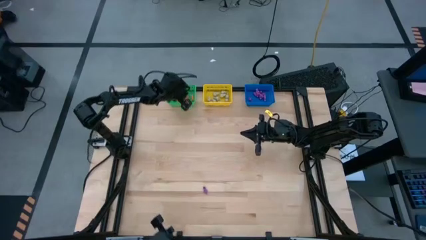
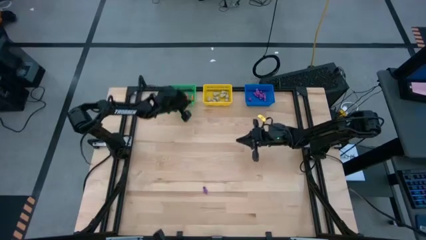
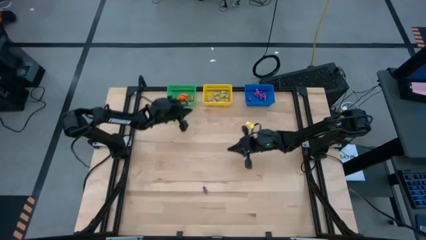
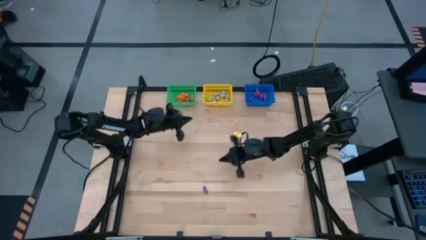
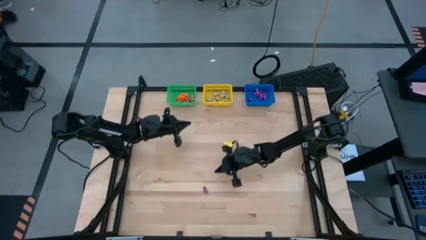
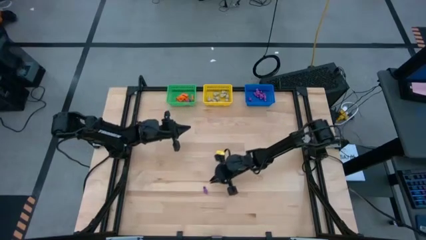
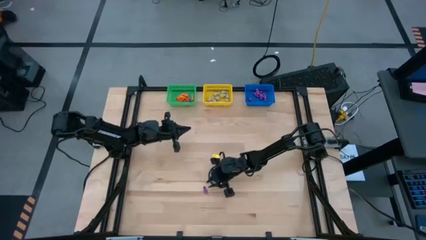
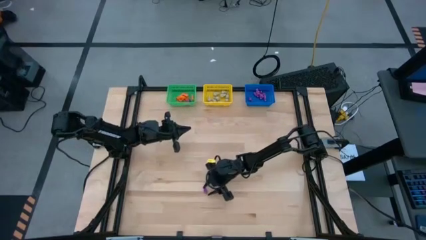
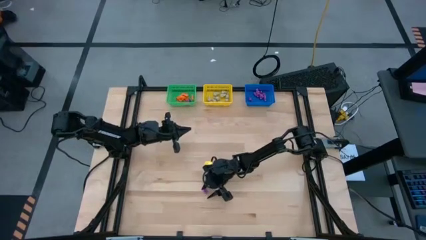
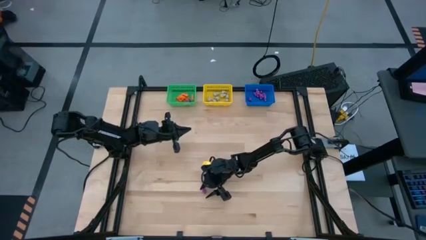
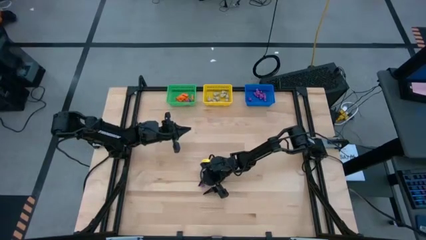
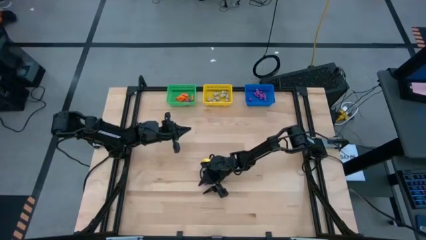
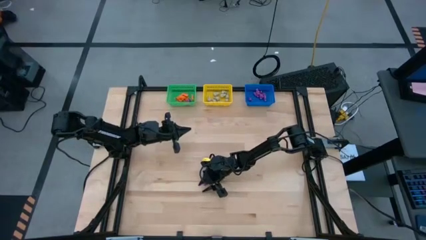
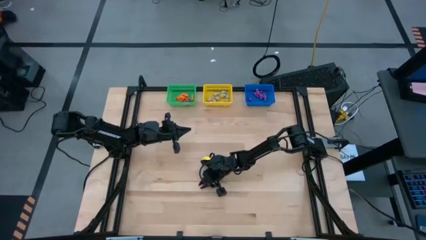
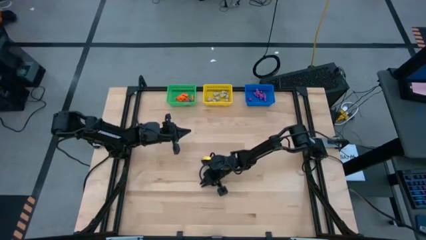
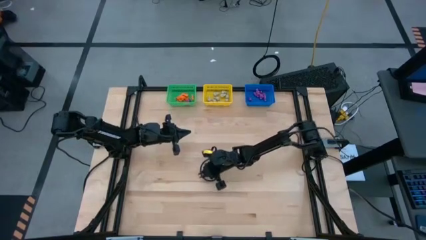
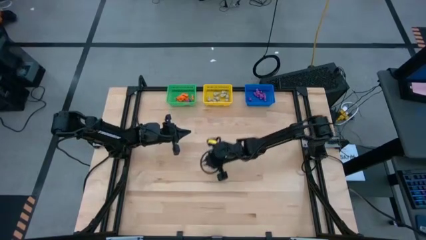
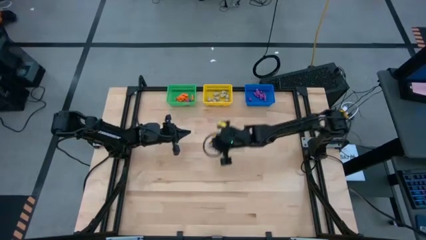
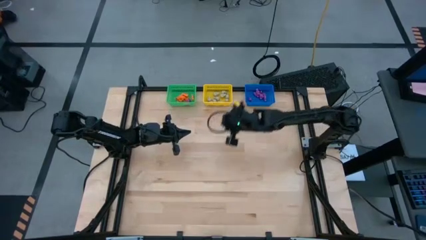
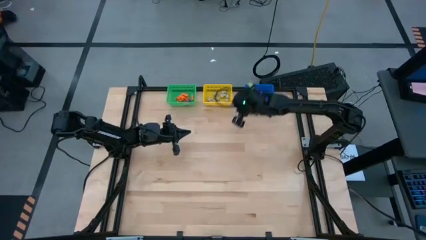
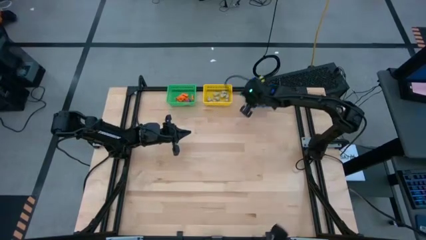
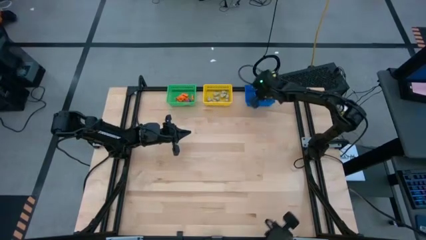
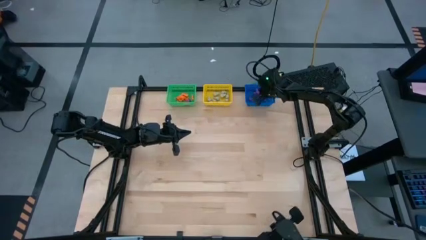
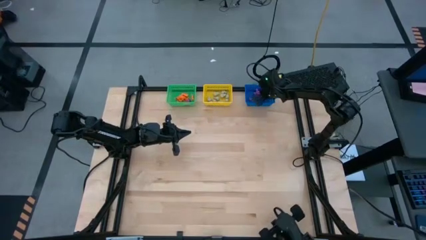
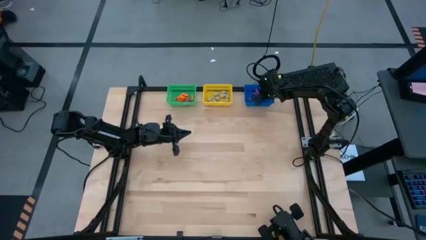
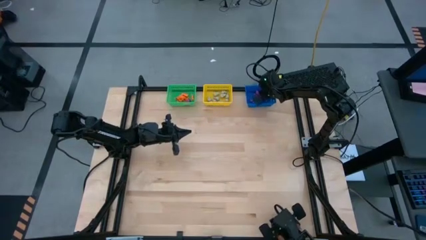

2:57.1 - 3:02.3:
Task: Sort Halloween decoration
Put the violet skeleton toy into the blue bin

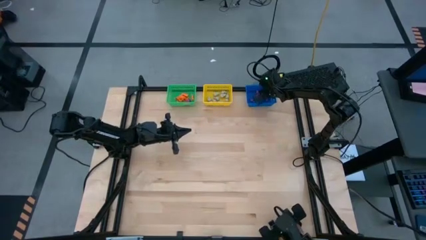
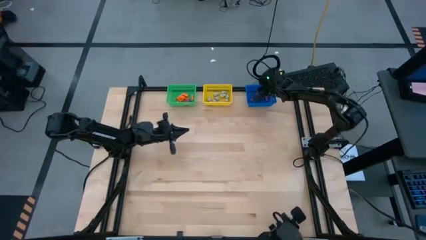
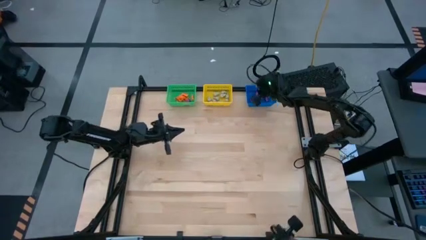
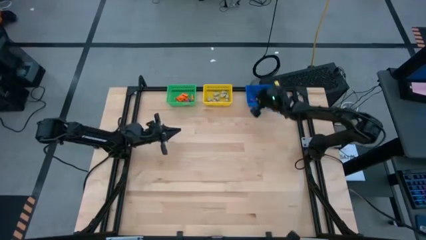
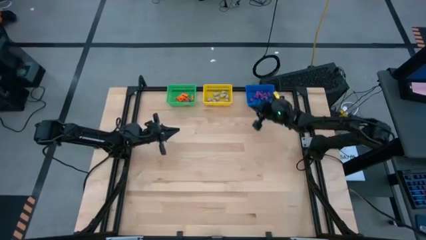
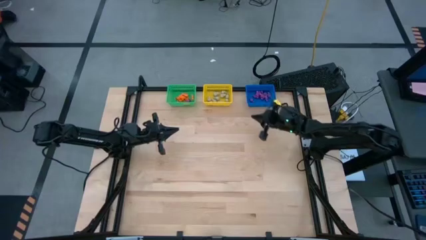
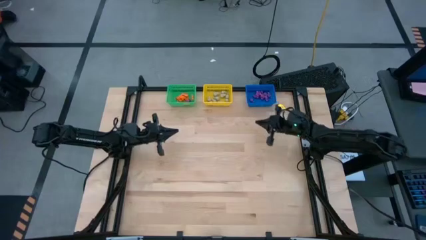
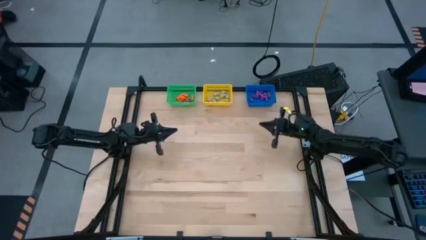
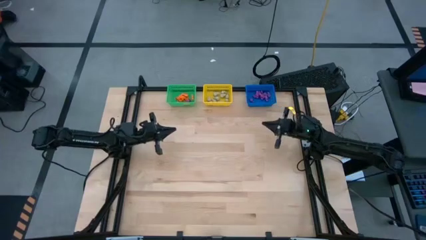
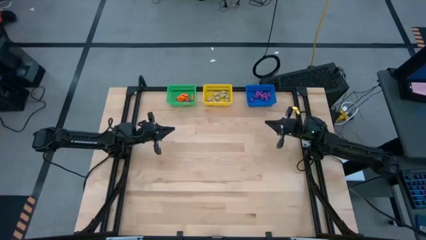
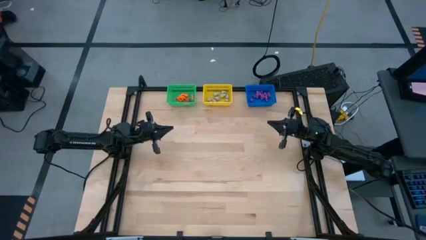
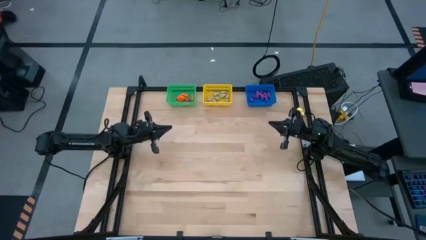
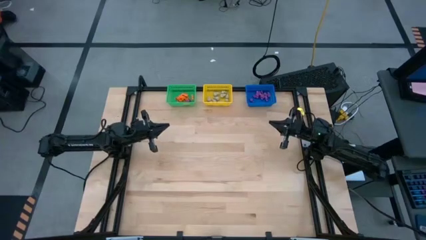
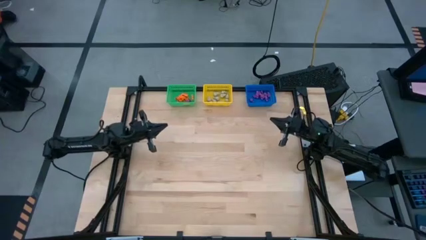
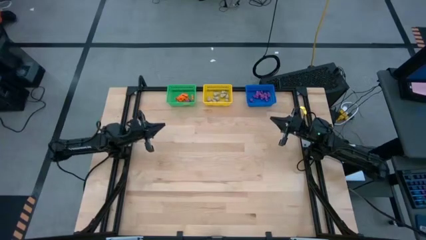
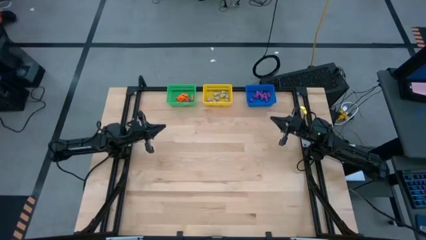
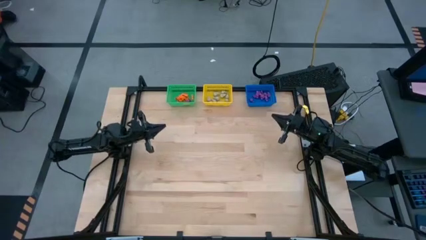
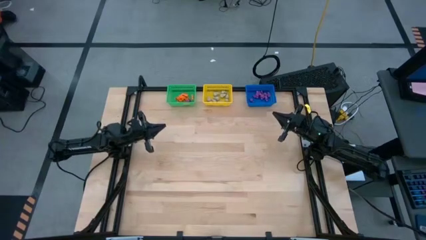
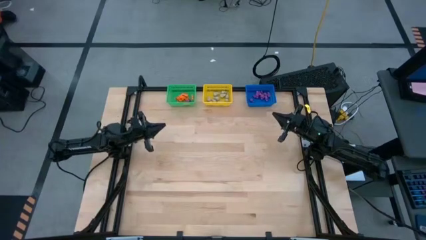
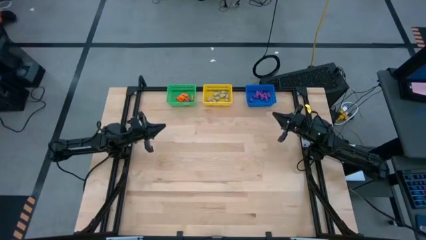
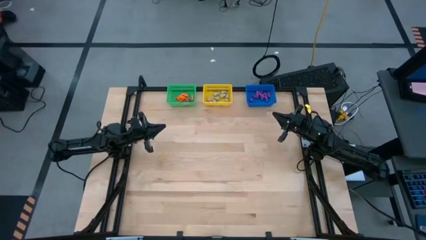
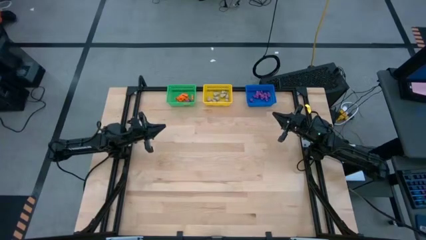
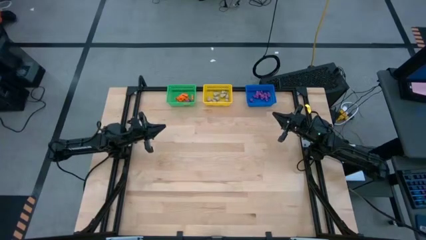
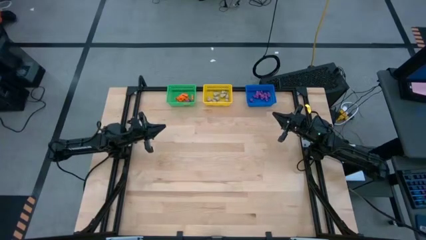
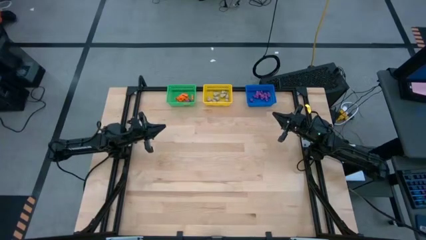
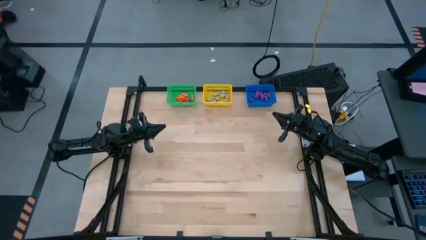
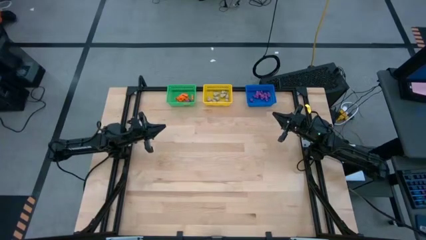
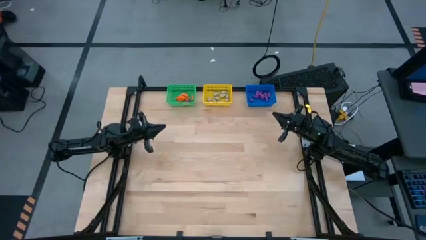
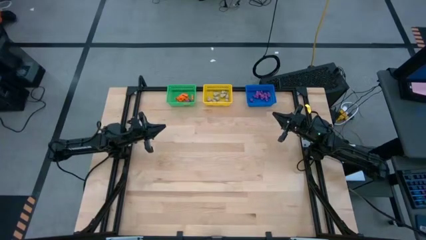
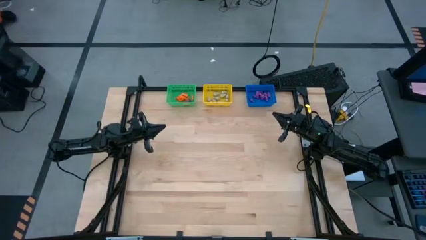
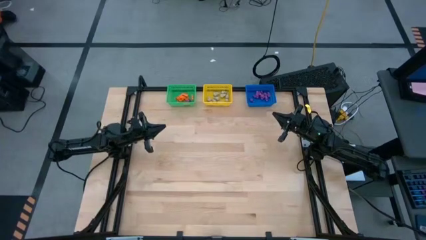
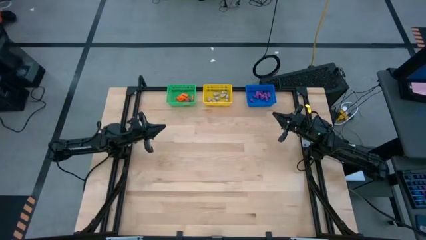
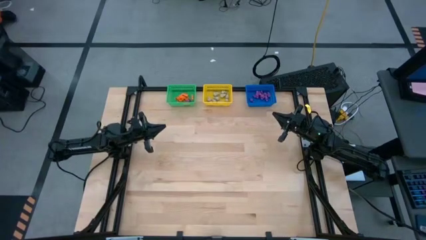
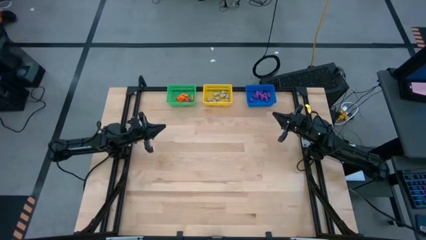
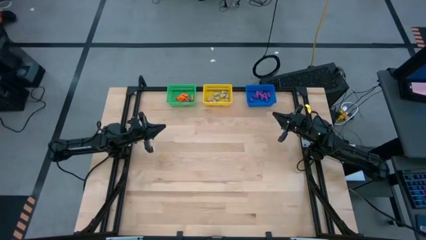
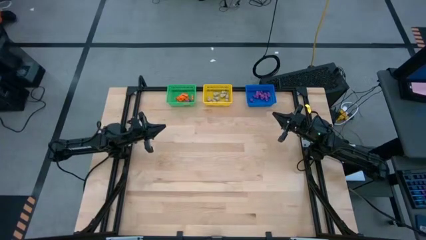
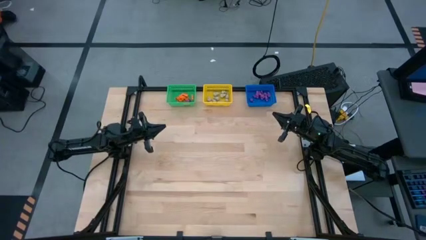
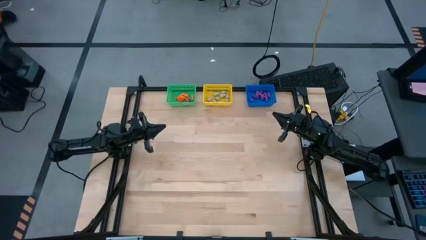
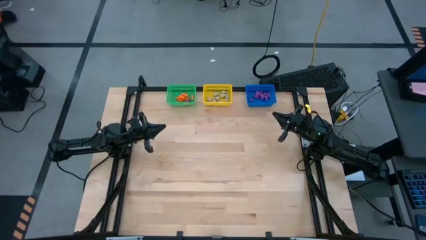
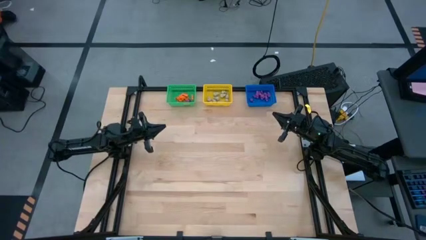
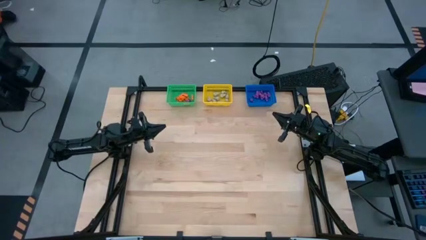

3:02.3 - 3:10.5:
Return to Home Position

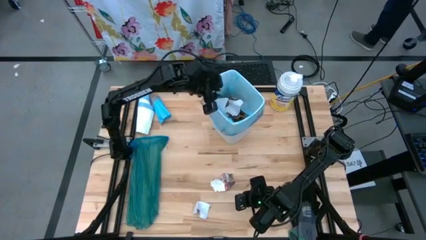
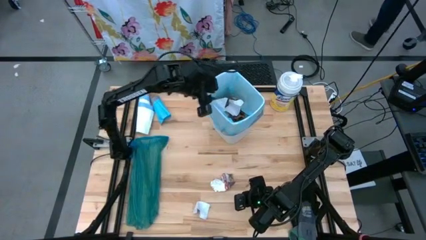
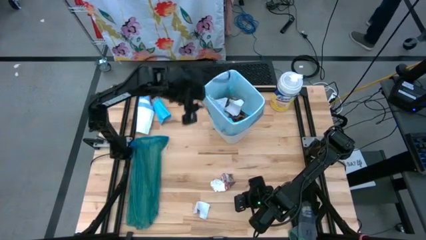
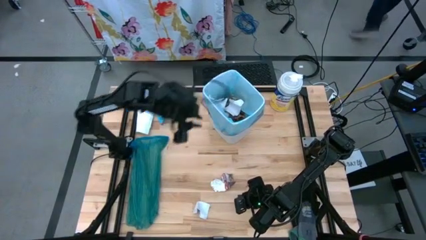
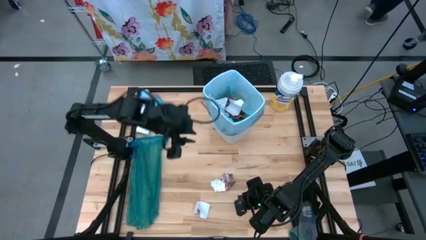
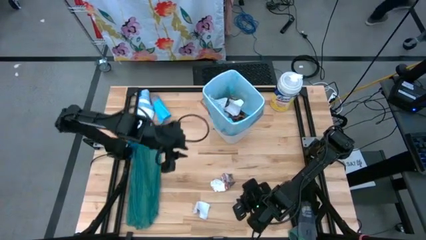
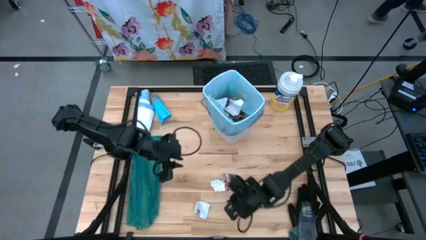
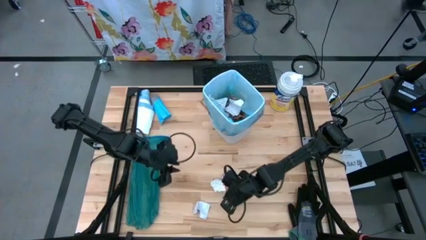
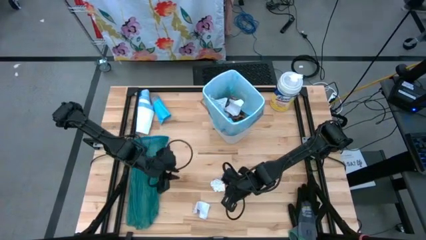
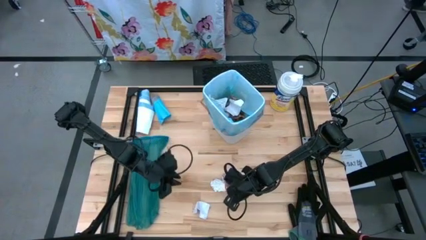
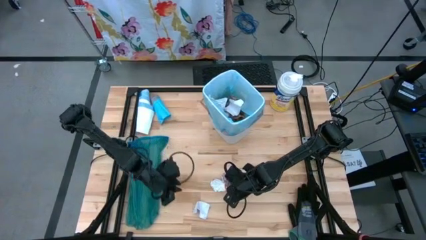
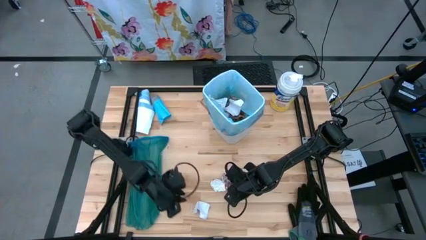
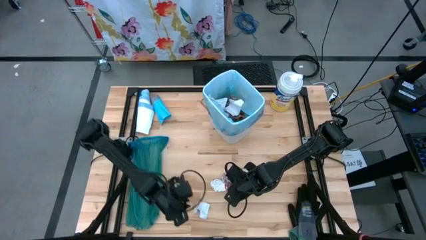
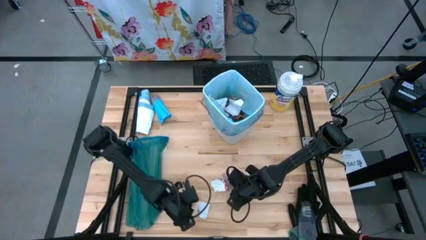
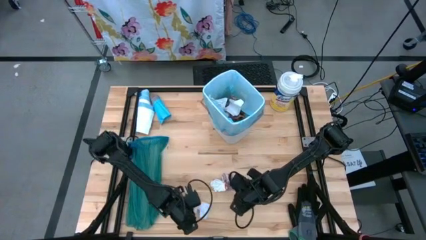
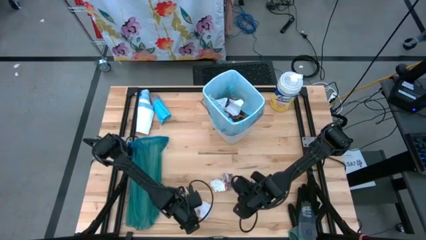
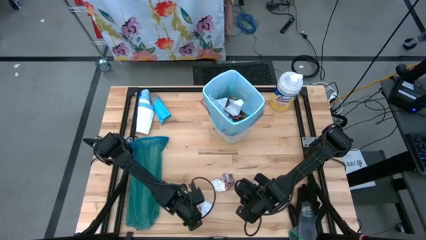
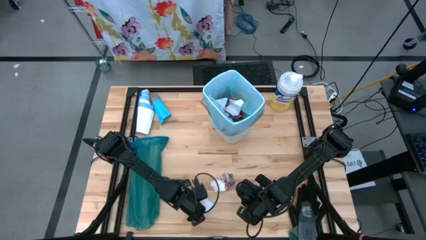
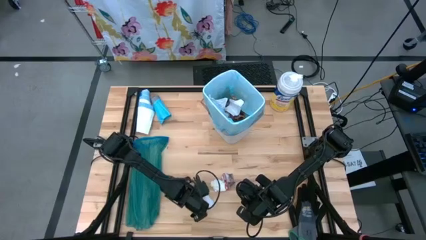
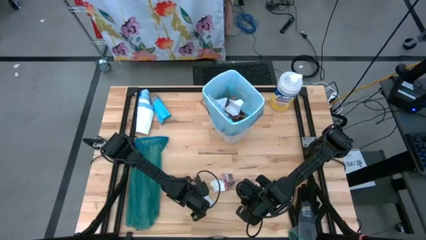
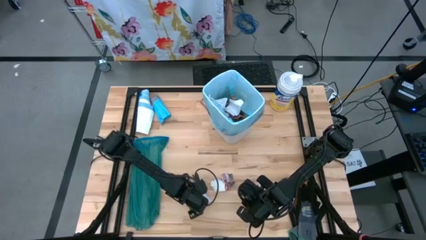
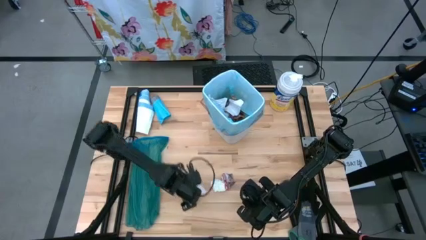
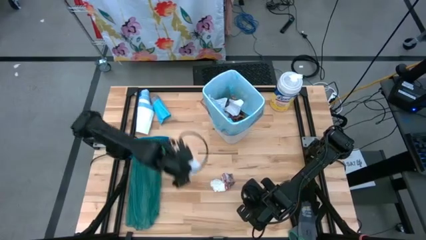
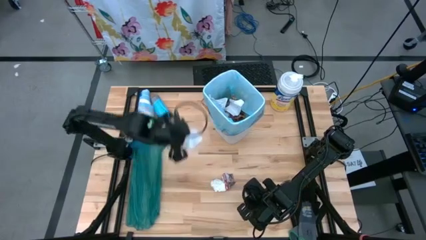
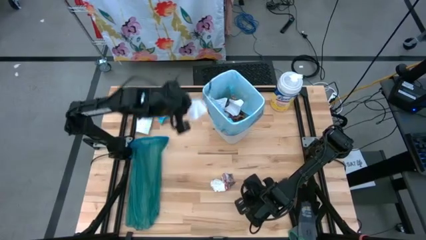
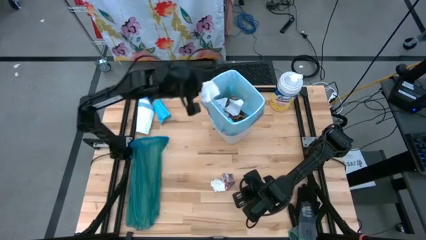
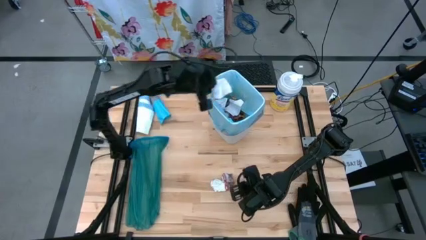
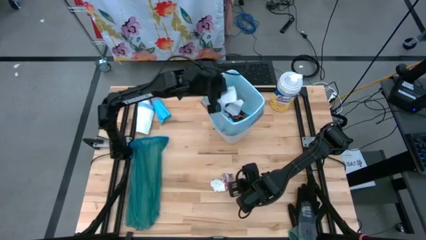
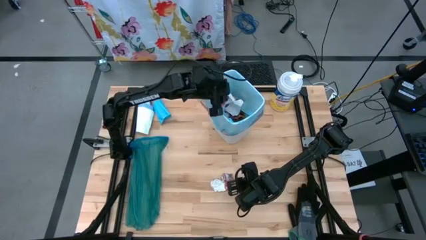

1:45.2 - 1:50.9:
Task: place trash/remove bag and relplace
Put the white paper in the trash bin
